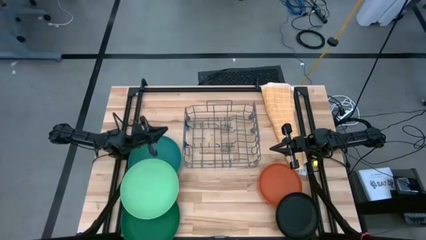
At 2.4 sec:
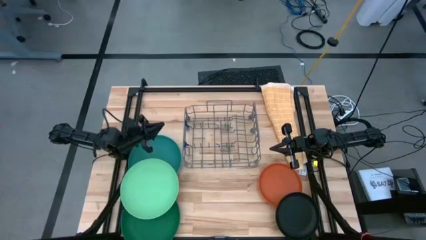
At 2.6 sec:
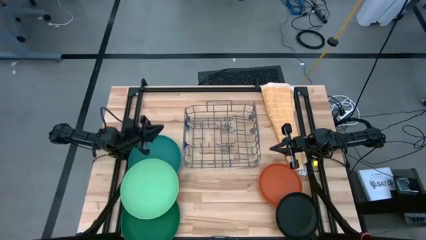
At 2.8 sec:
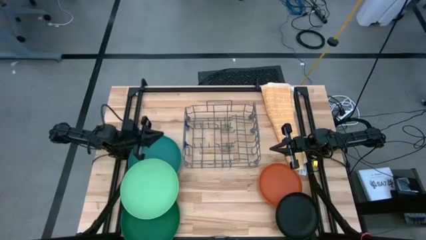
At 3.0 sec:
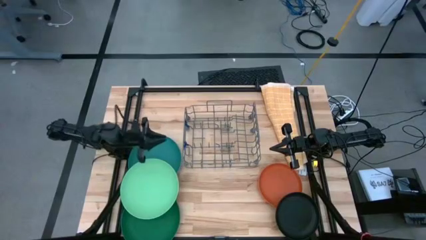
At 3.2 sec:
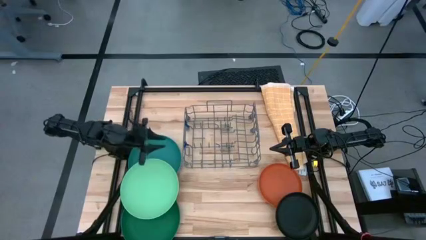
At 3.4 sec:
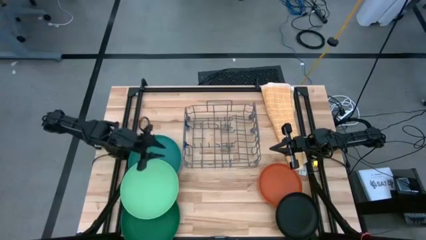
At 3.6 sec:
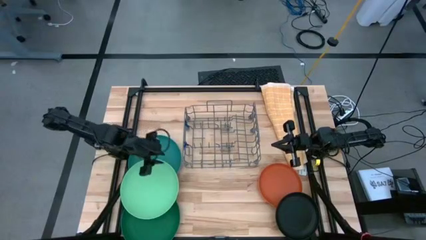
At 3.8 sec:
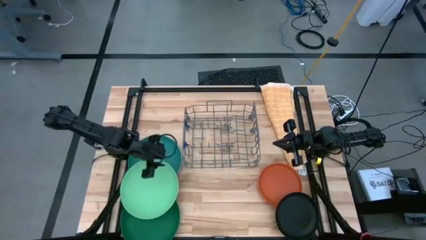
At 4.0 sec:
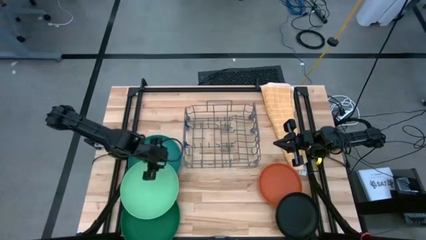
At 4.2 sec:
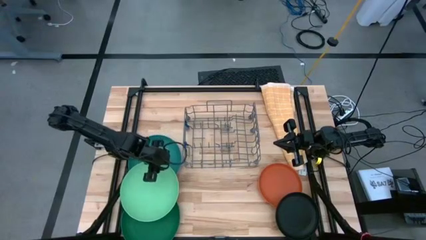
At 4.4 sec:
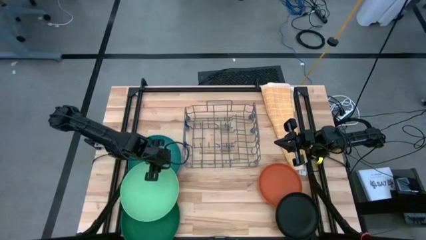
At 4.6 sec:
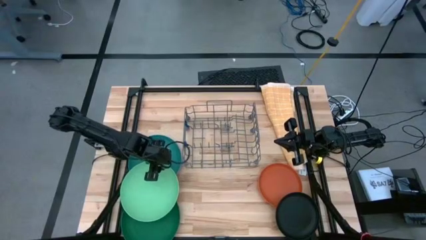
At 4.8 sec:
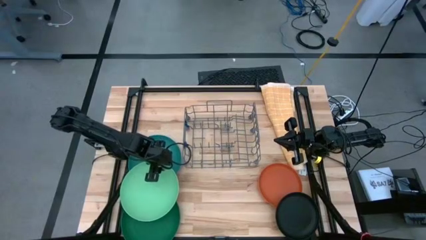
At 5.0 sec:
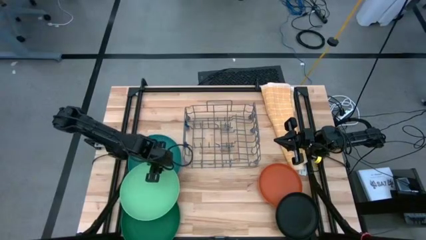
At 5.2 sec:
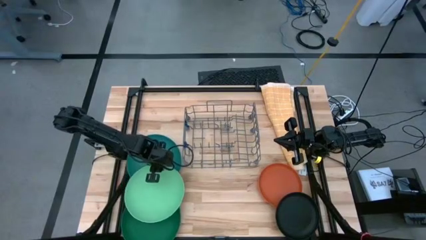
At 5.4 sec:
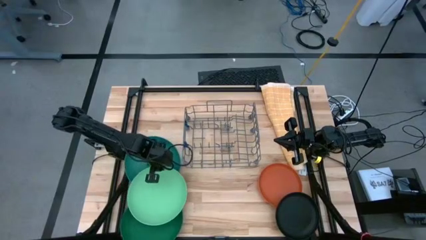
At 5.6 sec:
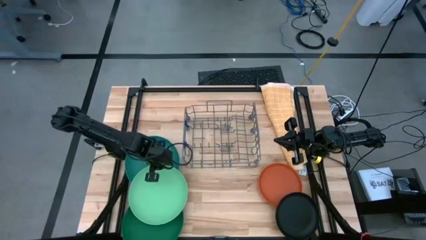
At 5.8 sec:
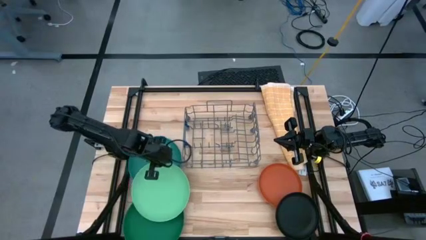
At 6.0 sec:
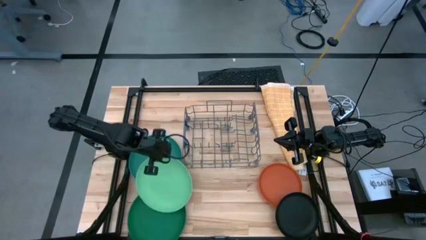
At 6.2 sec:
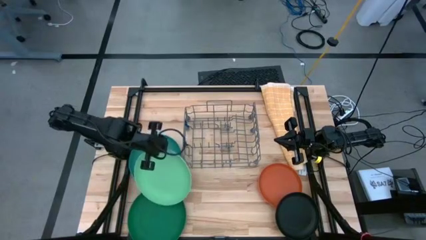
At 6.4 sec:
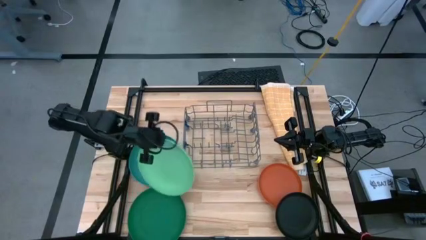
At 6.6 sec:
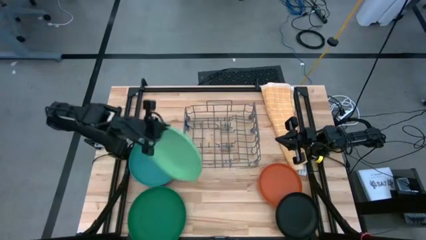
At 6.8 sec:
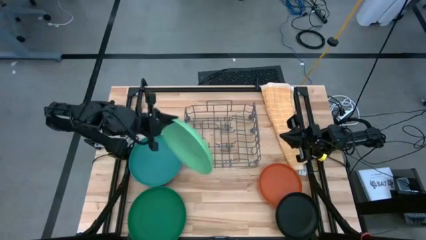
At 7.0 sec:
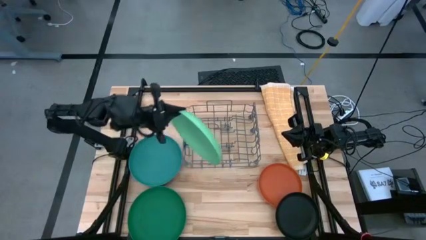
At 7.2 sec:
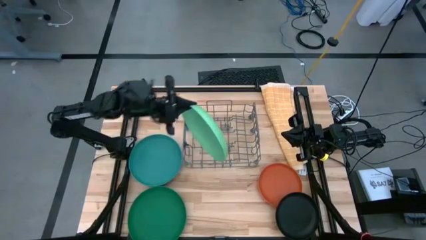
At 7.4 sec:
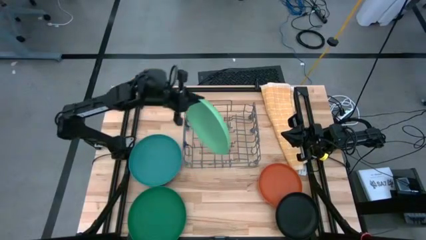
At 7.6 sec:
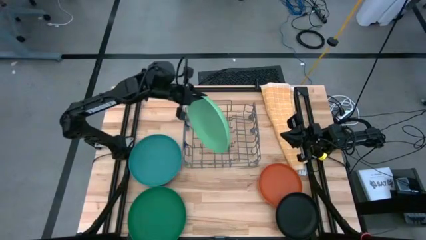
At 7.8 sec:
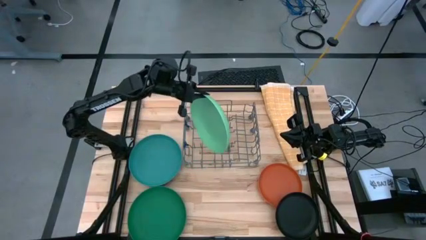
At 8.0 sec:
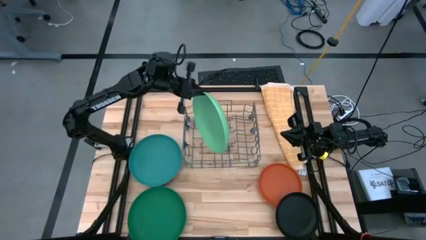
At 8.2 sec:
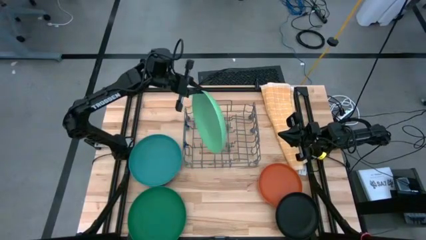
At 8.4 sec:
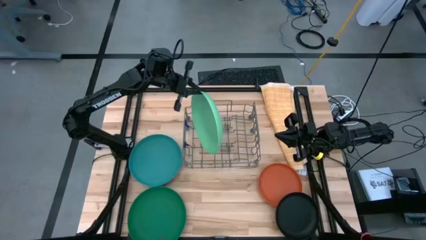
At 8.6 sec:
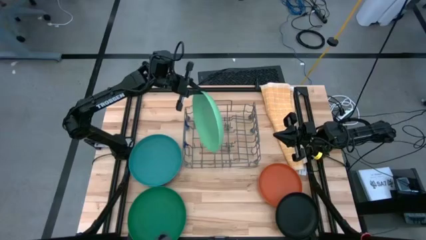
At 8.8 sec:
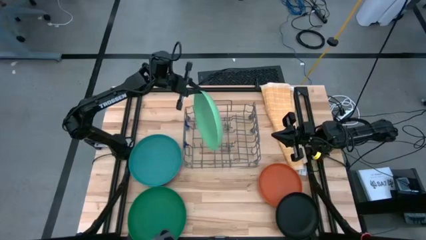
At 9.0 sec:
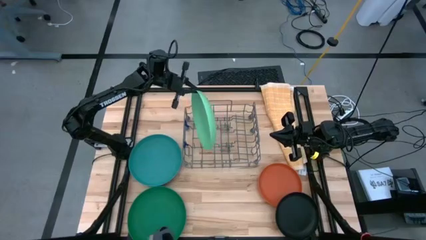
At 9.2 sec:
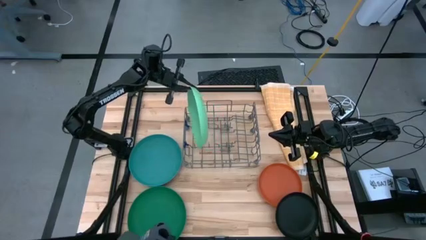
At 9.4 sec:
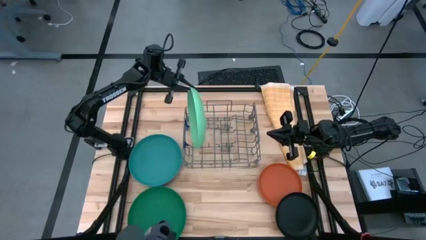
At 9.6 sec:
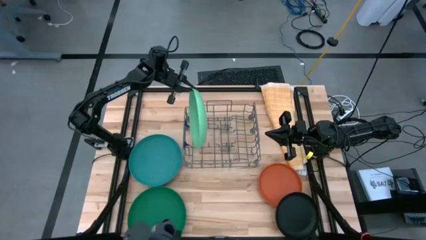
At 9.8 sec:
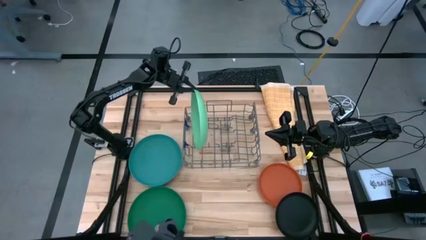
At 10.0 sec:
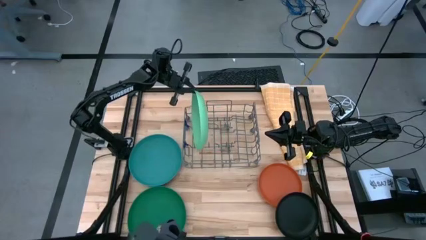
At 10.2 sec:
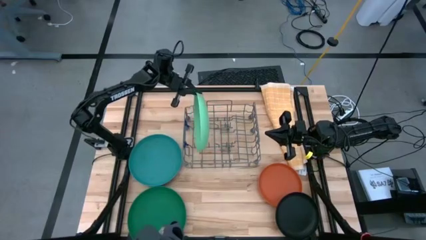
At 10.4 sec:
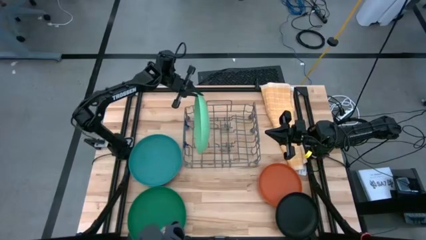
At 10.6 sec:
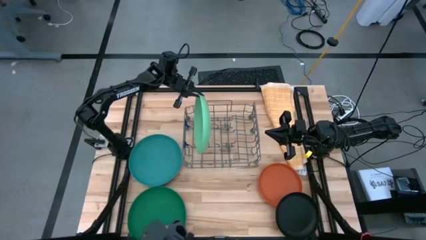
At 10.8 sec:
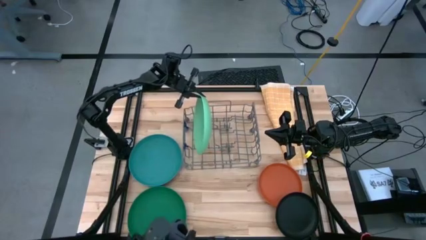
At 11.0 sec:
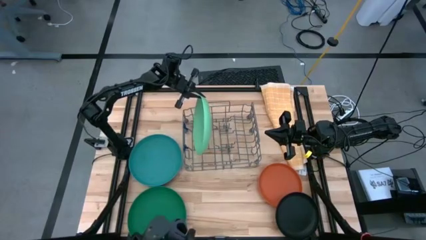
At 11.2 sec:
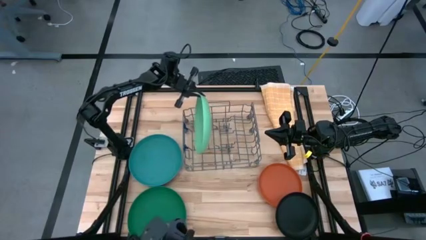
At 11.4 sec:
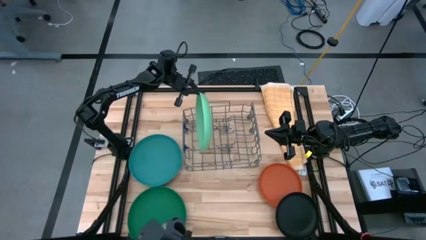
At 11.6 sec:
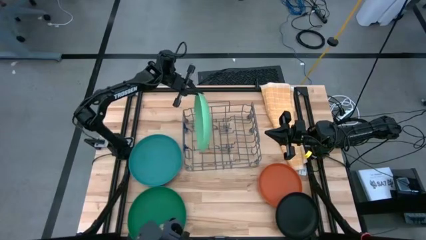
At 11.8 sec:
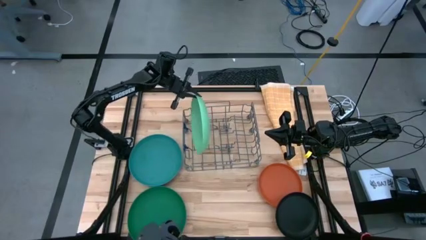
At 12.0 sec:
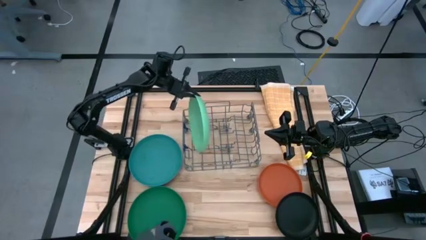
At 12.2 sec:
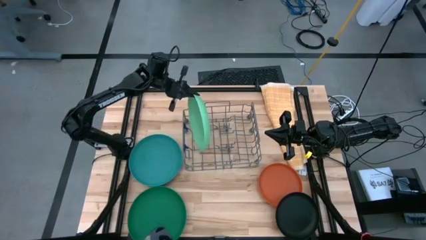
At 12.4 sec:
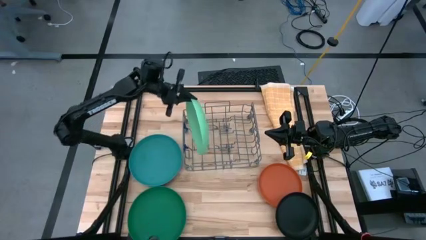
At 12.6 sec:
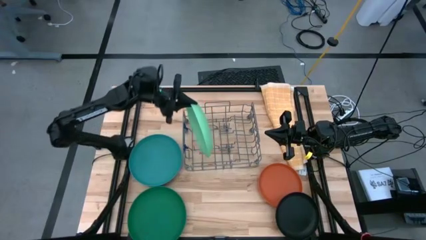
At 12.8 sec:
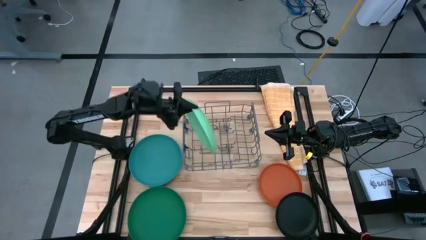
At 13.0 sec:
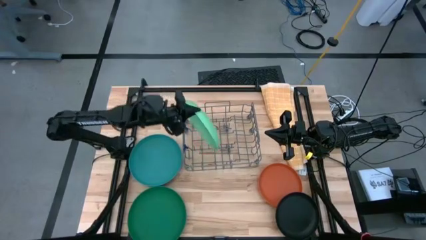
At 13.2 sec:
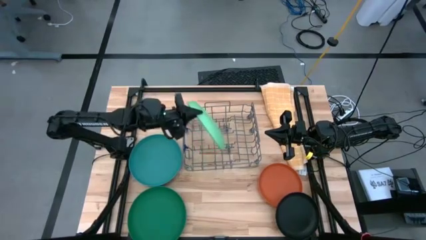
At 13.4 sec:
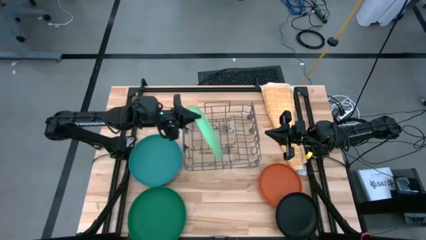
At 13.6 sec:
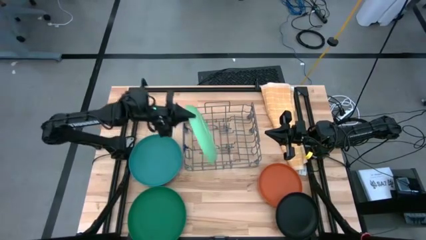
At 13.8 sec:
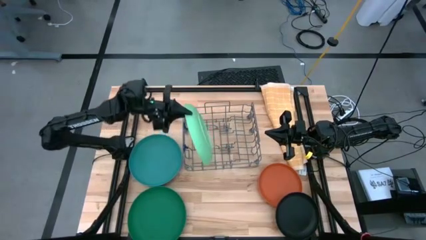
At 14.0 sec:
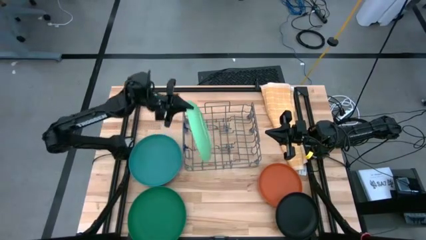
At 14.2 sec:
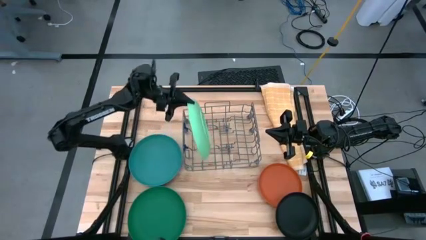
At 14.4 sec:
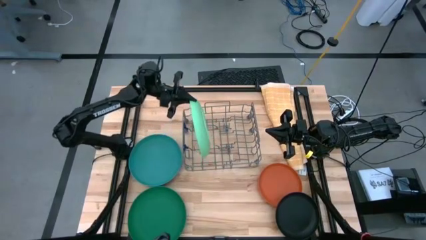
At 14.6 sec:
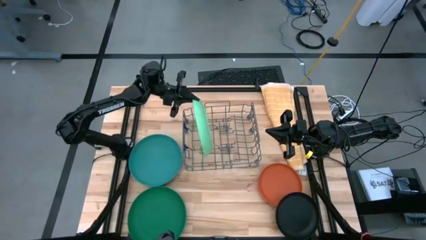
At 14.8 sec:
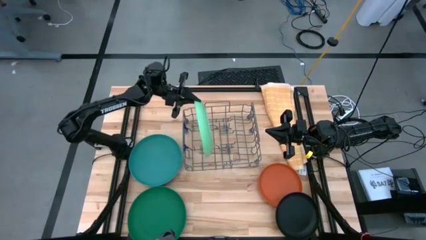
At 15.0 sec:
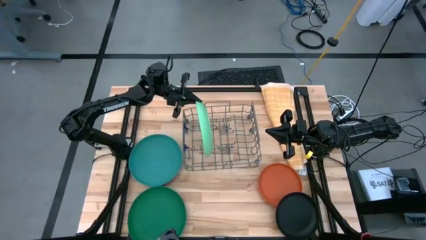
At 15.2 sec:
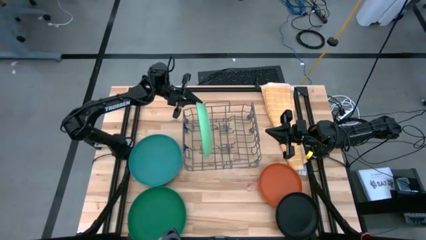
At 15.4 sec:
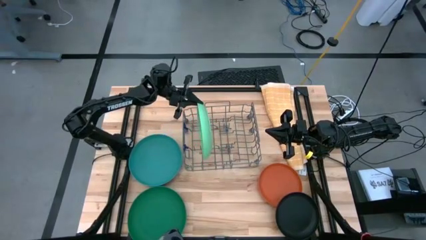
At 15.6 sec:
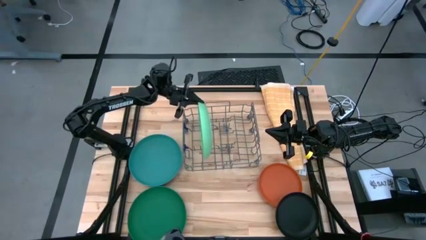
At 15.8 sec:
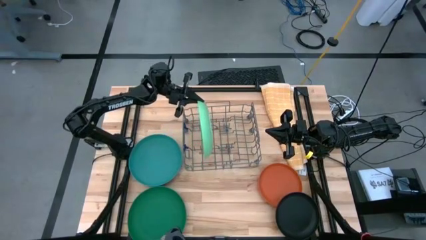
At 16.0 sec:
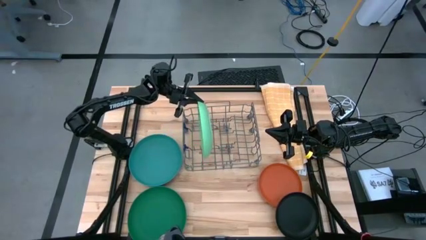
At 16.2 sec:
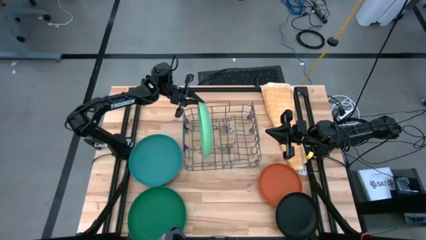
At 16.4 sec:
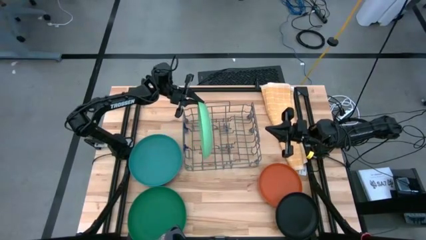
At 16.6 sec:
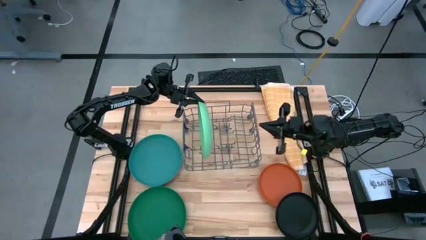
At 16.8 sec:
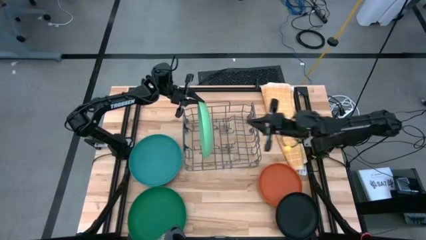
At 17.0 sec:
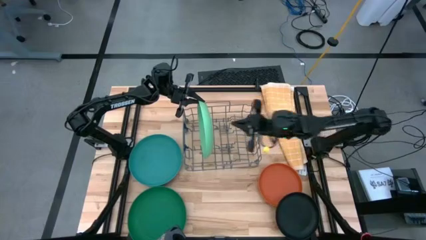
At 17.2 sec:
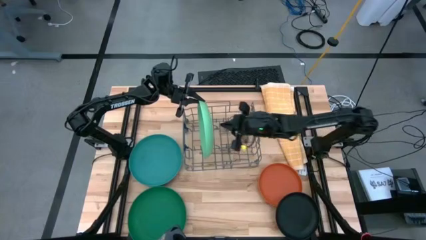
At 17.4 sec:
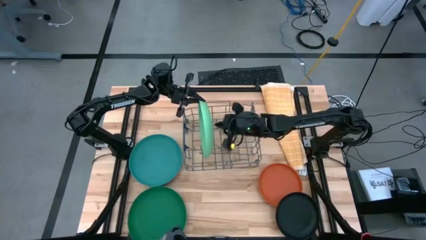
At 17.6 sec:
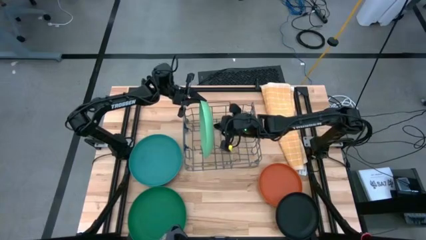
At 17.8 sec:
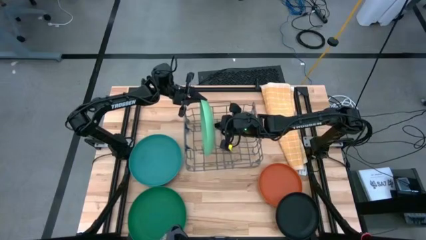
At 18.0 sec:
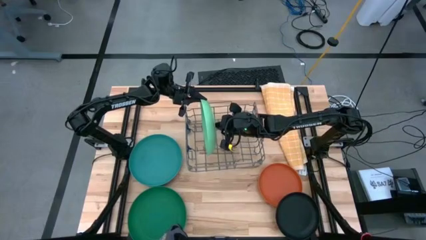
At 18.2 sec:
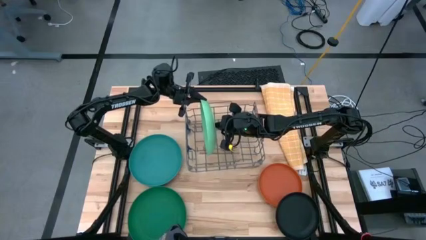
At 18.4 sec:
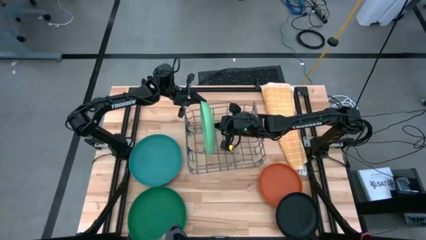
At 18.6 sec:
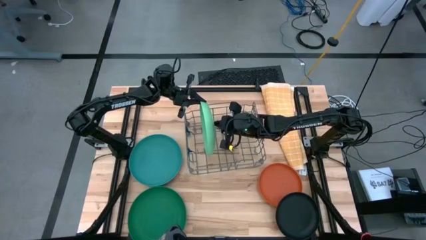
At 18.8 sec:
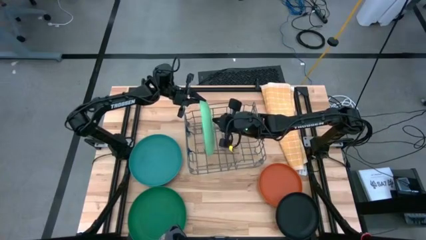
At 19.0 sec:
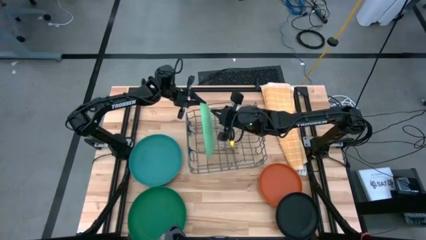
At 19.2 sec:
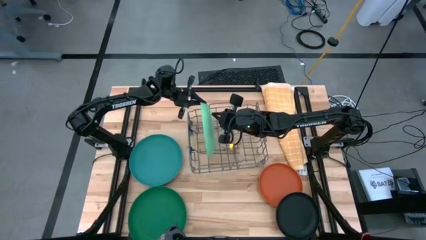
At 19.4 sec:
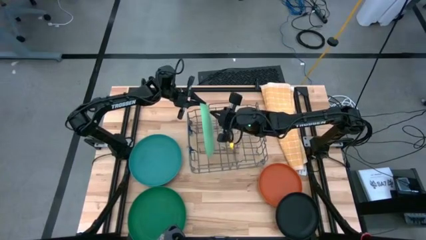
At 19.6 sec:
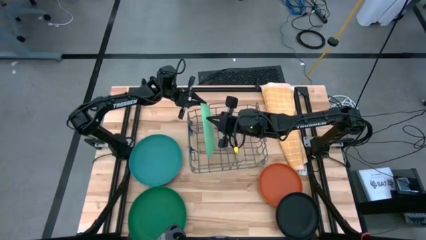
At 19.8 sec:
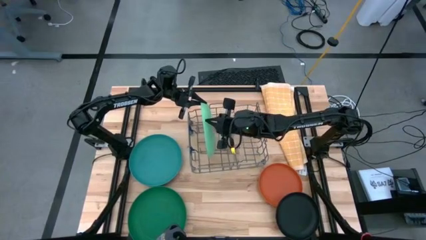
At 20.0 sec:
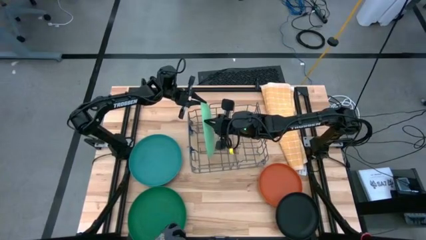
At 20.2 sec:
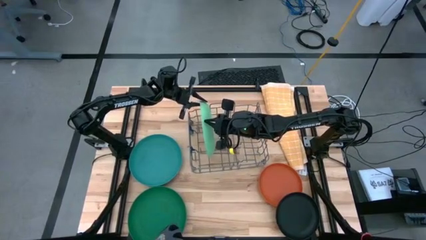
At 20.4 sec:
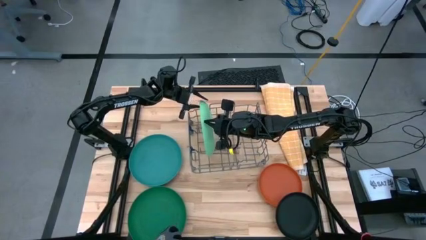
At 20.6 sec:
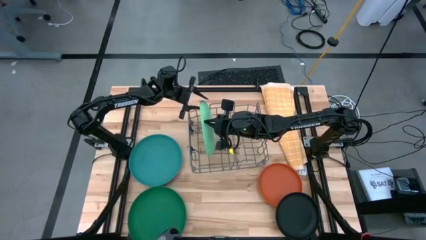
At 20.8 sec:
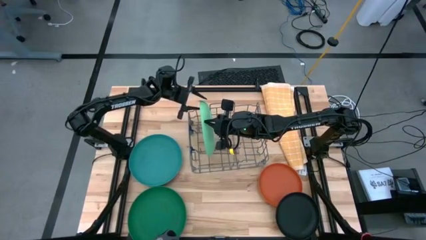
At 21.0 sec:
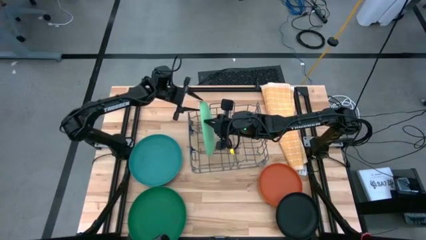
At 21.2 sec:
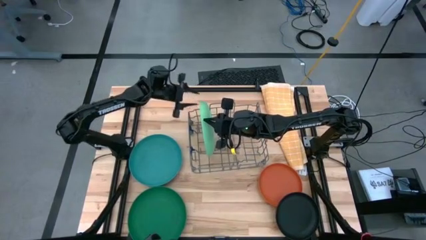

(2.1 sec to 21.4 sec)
Task: Sort dishes
Put the light green plate in the dishwasher rack
